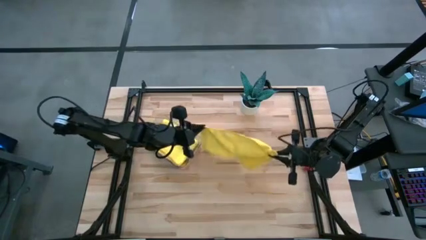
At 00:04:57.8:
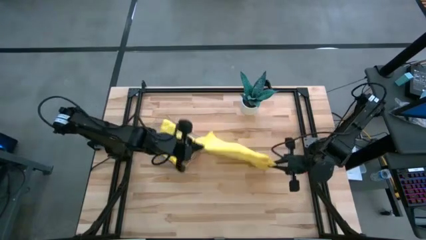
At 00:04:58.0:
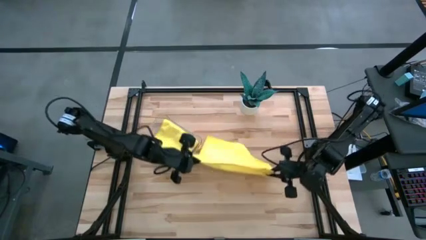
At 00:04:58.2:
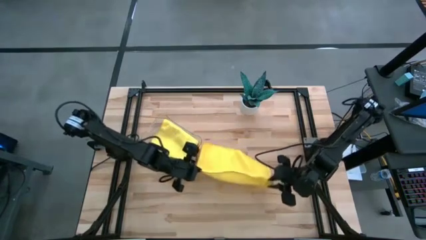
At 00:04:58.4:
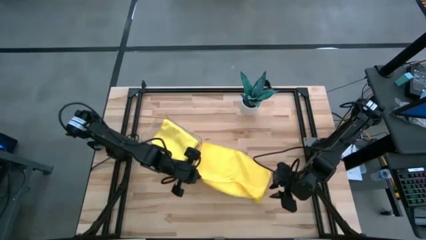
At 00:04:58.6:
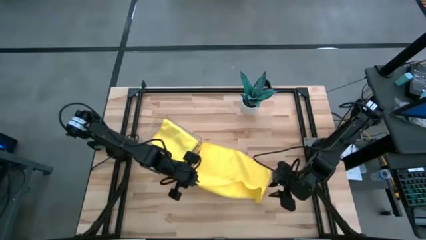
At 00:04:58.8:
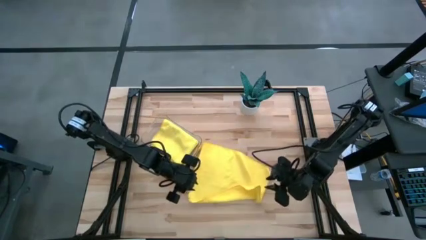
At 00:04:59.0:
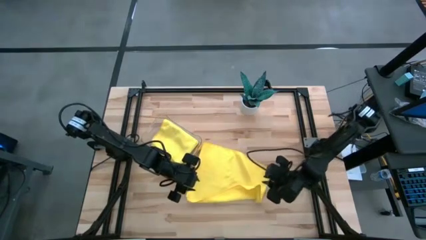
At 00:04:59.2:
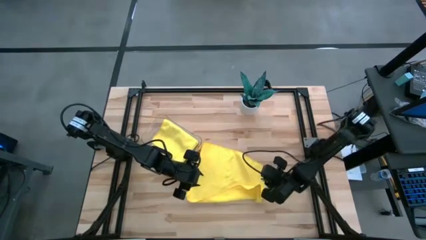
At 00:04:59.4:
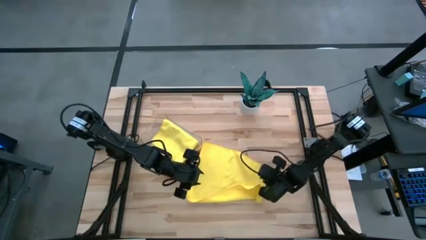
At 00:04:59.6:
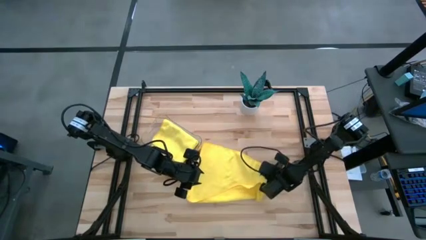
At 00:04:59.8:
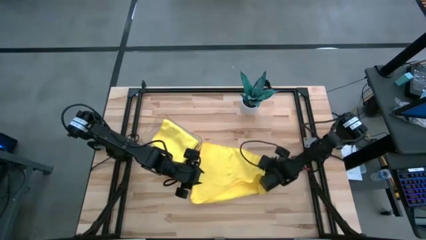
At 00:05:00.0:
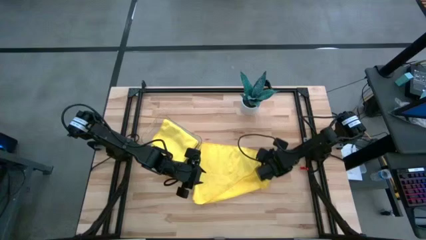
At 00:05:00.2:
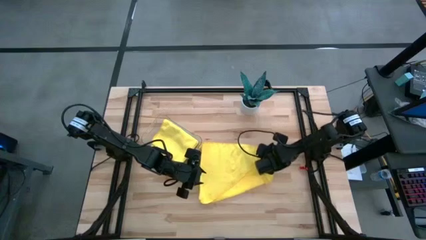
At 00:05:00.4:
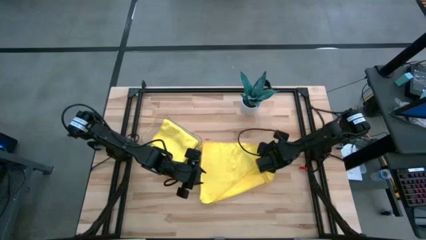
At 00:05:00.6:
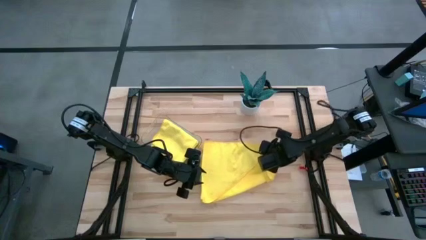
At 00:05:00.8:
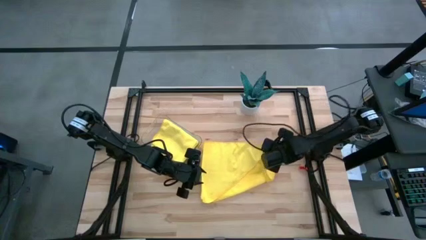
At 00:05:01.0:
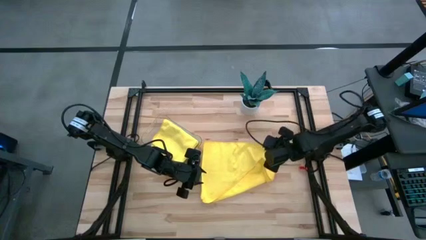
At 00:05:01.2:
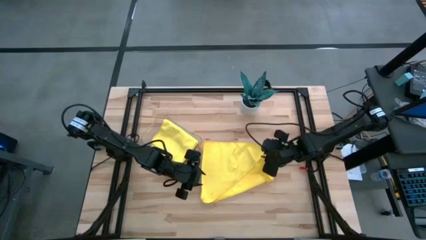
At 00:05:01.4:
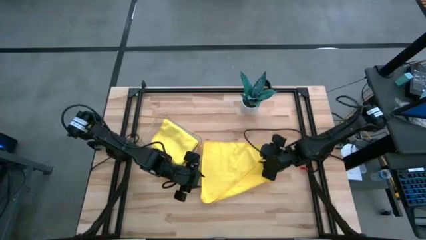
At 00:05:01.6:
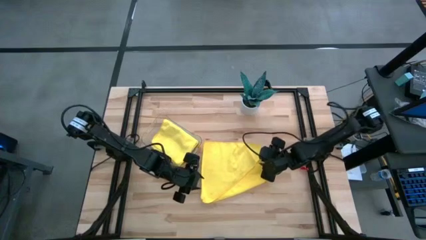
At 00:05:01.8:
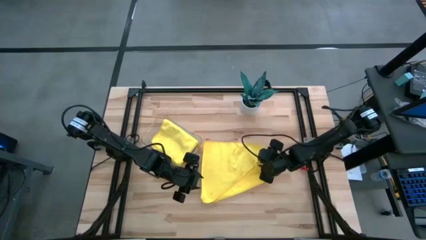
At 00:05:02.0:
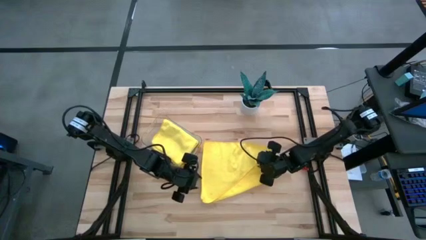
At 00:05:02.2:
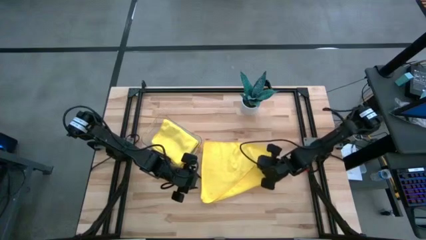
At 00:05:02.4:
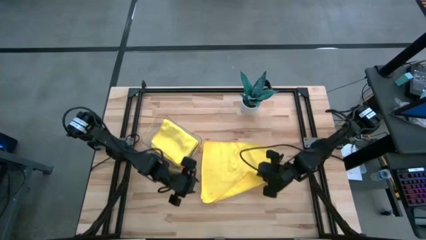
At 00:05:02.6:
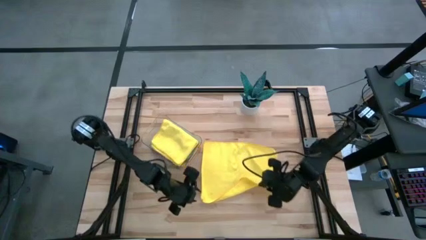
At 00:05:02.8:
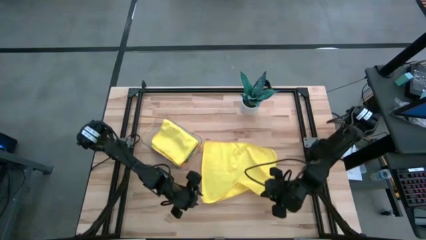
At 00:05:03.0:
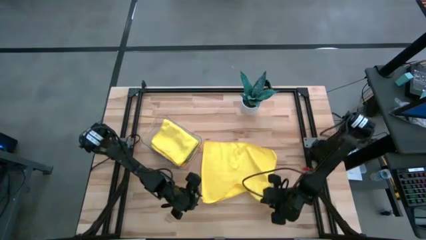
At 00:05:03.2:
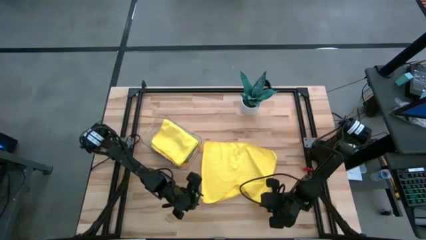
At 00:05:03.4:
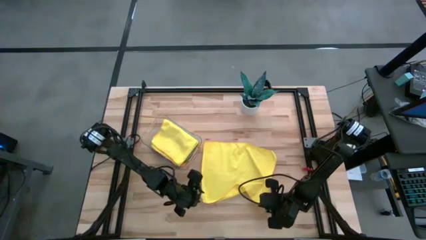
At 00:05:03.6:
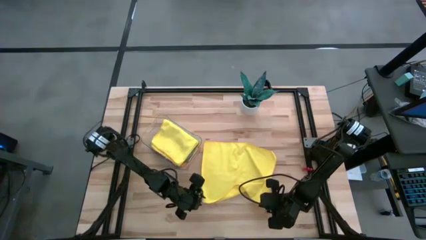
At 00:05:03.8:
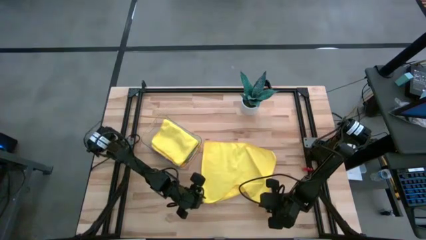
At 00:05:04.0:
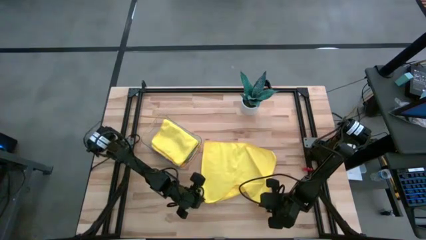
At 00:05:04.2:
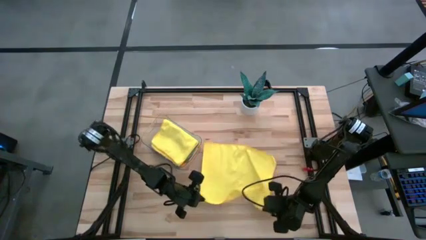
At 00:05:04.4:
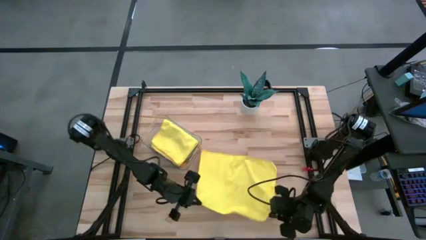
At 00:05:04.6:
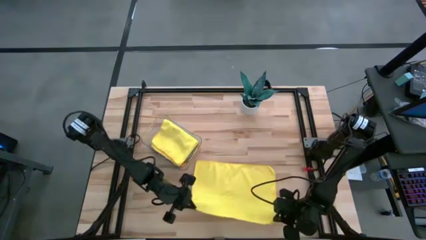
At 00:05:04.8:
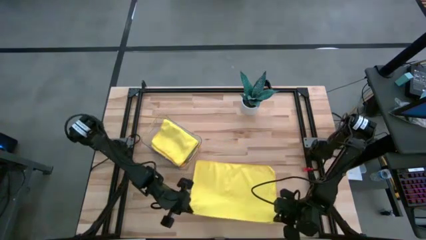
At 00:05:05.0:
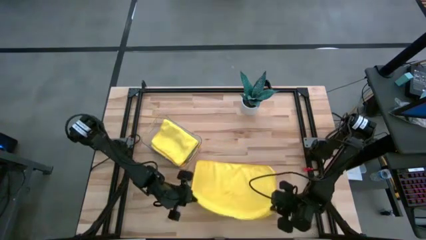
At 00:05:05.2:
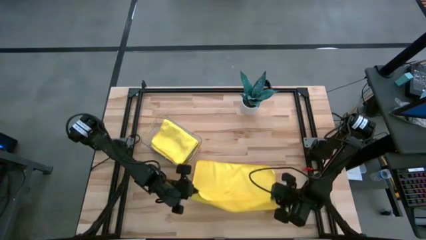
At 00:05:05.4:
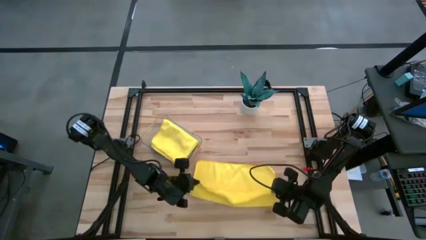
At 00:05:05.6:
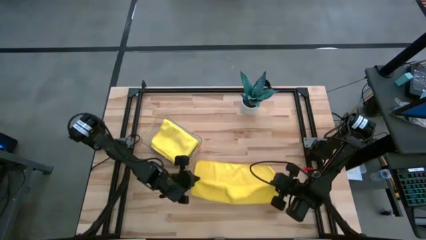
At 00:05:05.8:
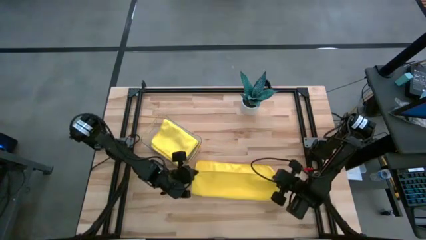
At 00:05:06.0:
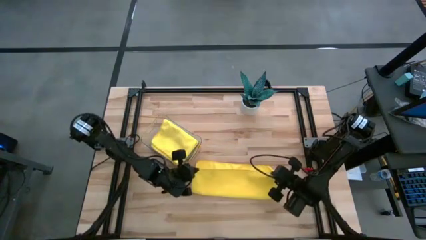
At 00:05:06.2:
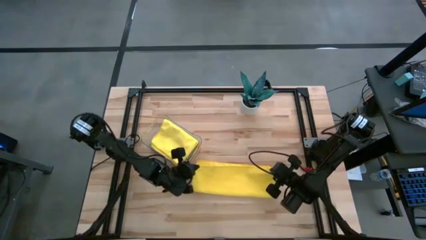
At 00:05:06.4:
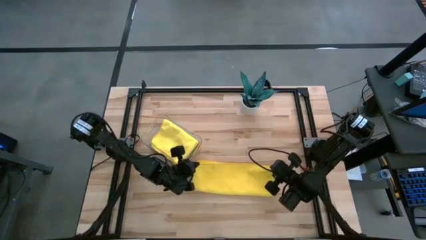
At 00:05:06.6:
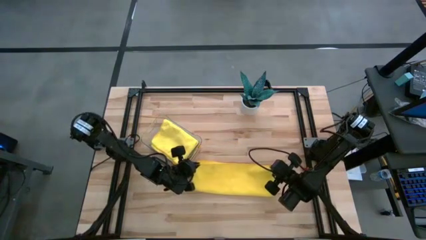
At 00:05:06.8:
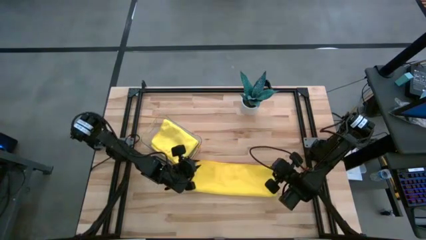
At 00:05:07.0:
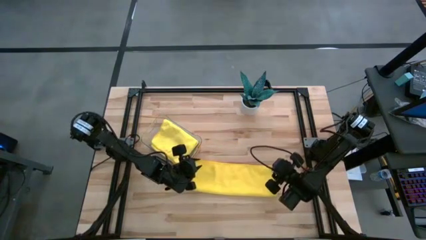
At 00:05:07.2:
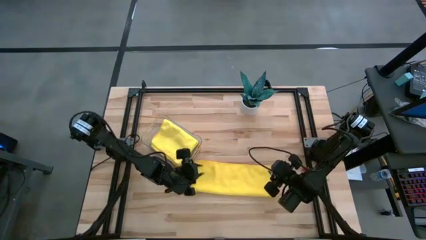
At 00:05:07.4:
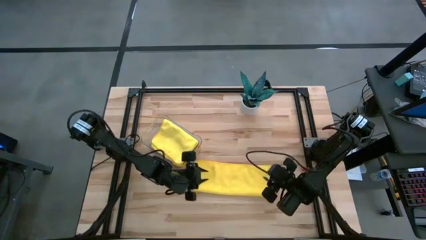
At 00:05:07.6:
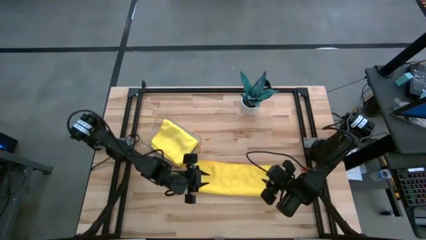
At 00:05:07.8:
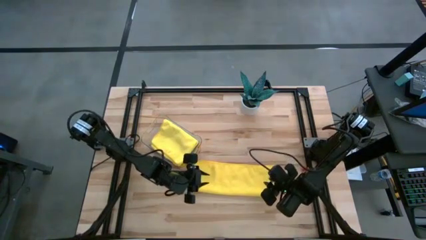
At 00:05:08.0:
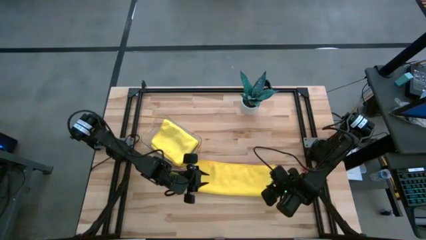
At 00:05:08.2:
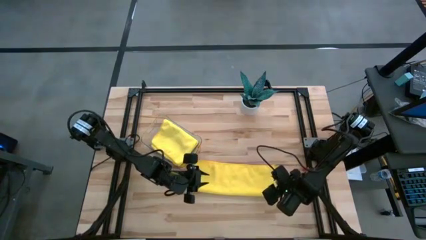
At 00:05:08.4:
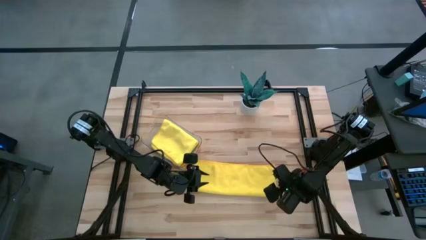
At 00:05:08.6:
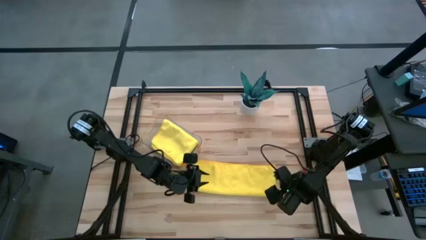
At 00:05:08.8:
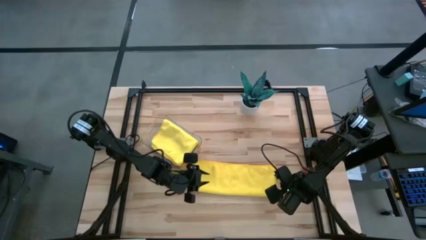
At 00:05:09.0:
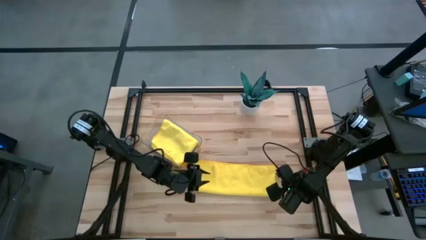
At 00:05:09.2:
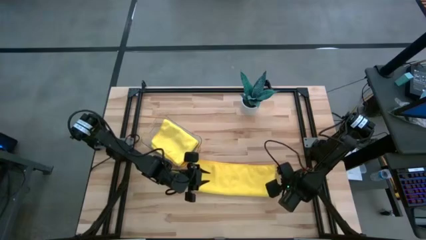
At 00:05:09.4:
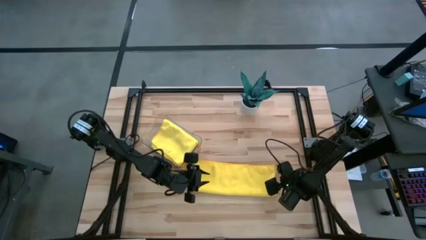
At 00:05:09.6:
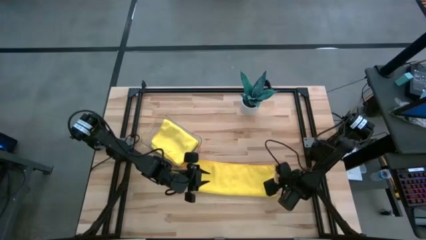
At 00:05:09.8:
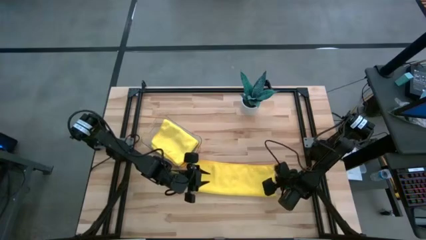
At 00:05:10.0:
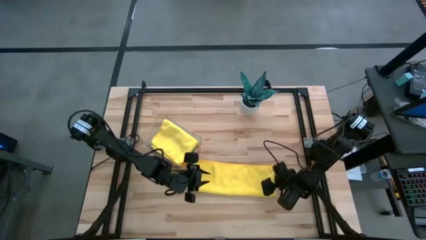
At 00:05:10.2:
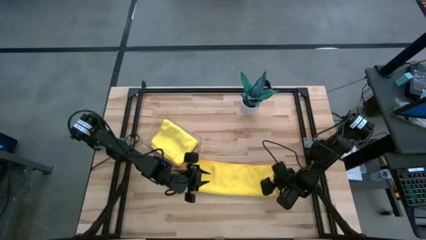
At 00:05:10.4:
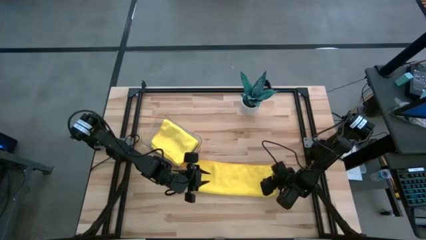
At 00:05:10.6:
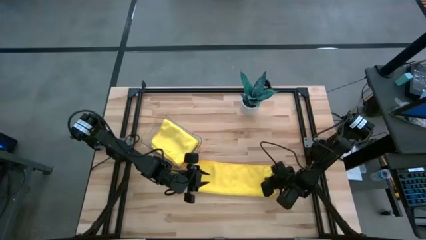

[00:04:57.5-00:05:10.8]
Task: Fold microfiber towels
Fold the yellow microfiber cloth
